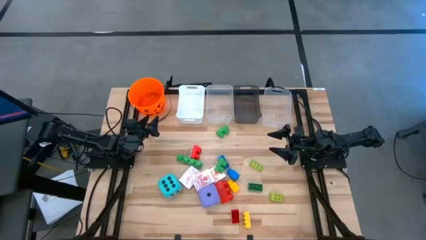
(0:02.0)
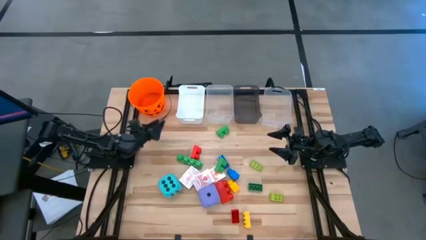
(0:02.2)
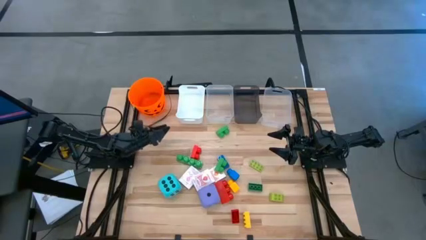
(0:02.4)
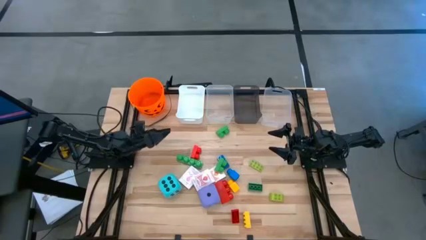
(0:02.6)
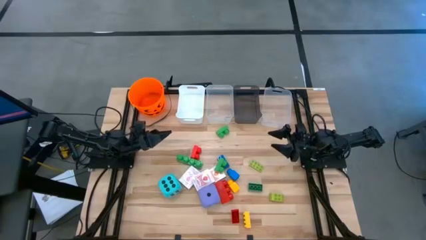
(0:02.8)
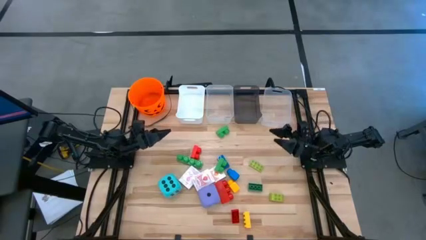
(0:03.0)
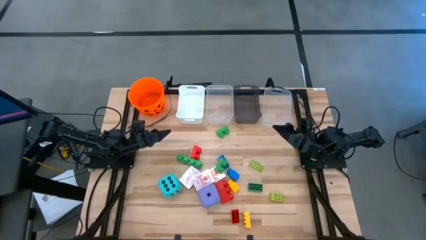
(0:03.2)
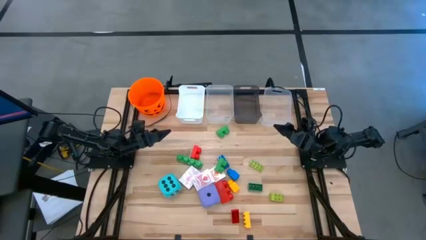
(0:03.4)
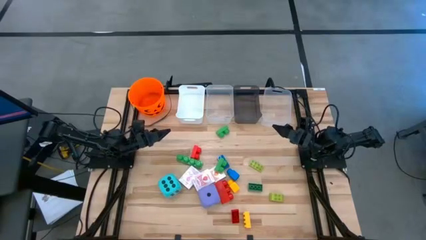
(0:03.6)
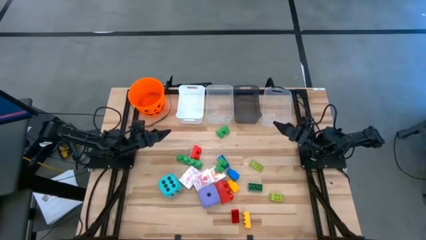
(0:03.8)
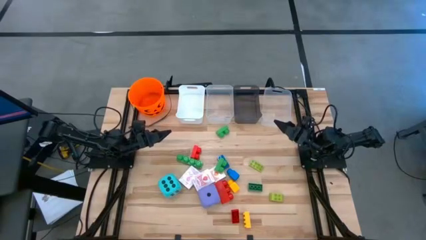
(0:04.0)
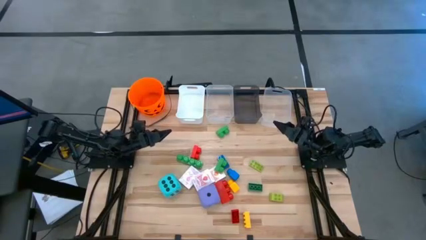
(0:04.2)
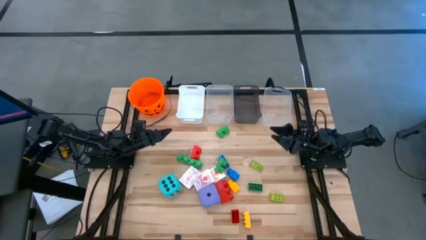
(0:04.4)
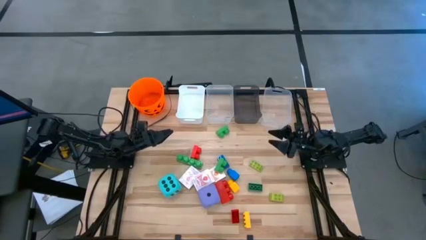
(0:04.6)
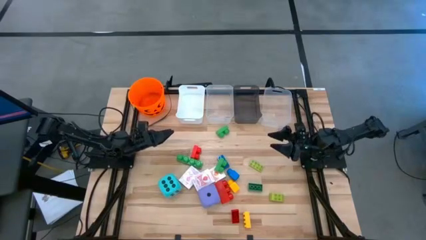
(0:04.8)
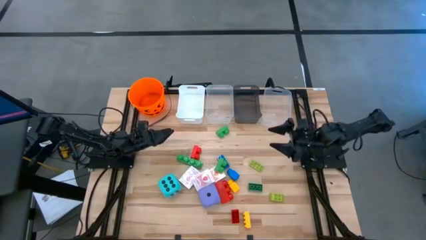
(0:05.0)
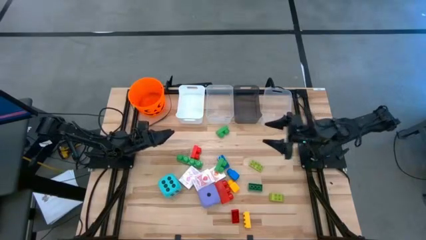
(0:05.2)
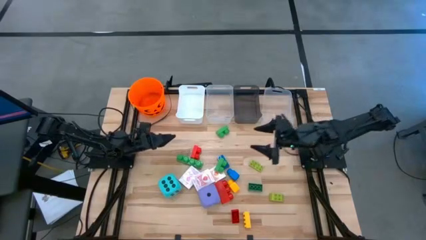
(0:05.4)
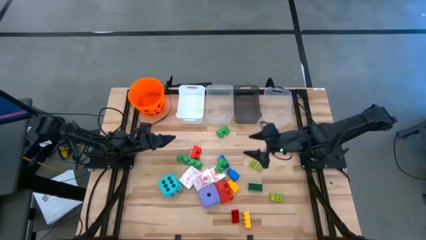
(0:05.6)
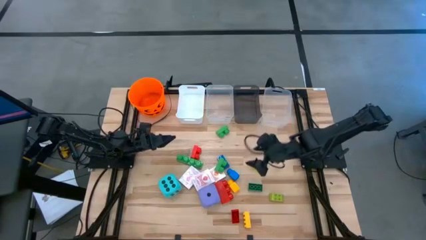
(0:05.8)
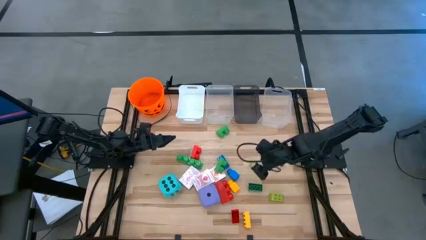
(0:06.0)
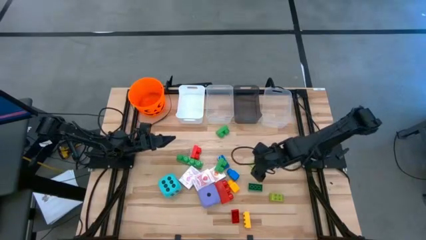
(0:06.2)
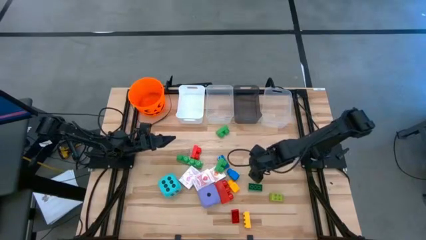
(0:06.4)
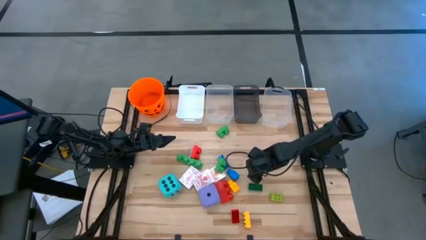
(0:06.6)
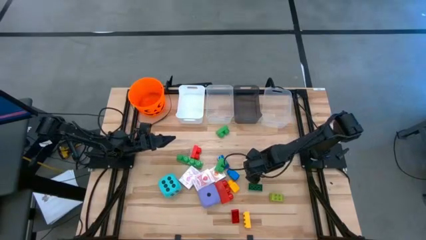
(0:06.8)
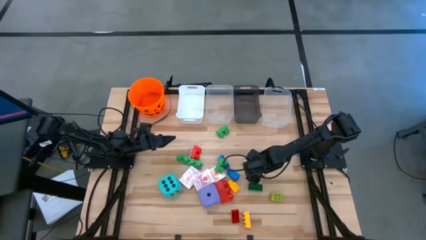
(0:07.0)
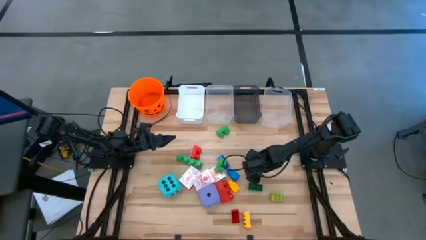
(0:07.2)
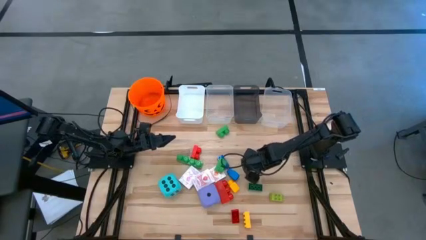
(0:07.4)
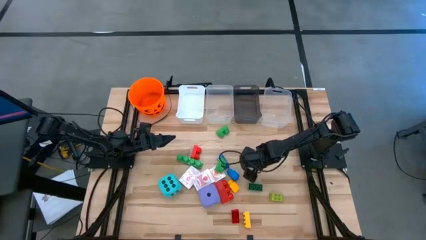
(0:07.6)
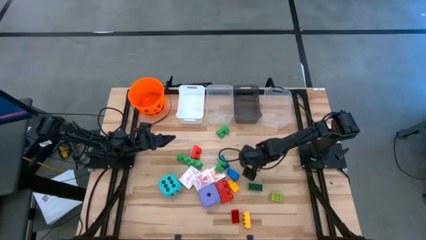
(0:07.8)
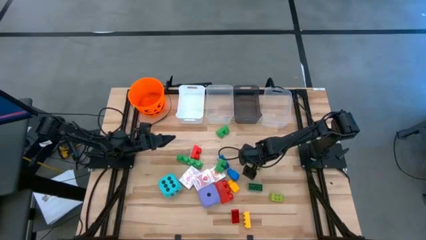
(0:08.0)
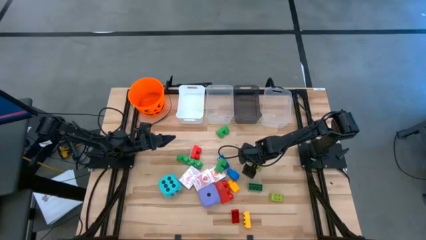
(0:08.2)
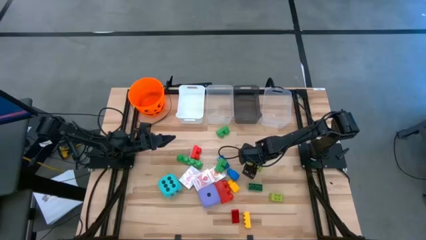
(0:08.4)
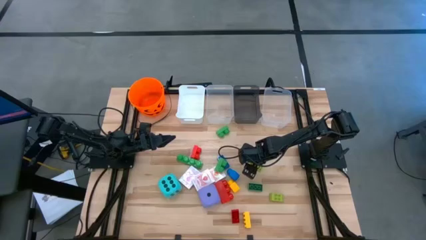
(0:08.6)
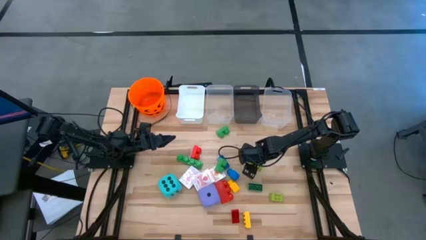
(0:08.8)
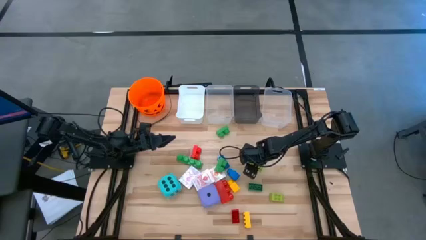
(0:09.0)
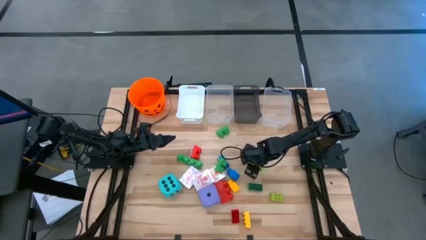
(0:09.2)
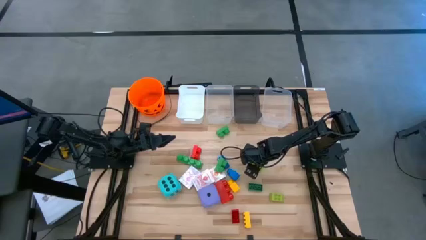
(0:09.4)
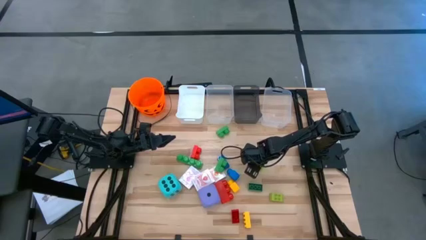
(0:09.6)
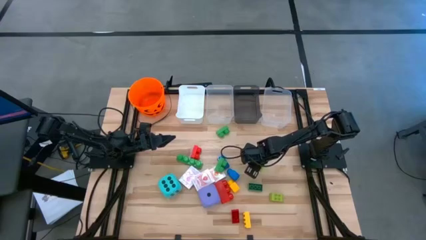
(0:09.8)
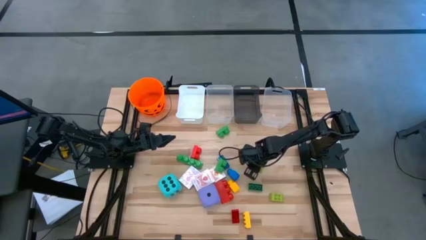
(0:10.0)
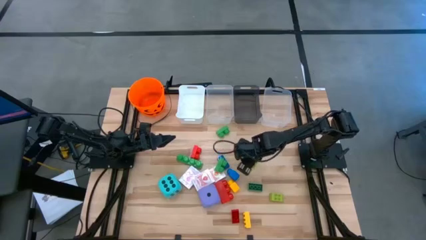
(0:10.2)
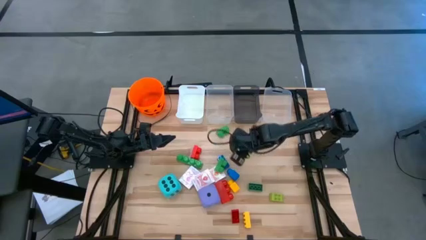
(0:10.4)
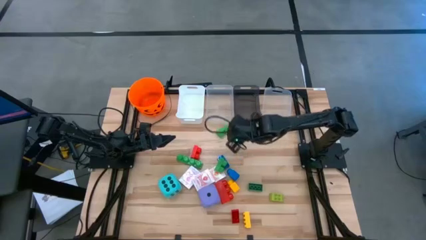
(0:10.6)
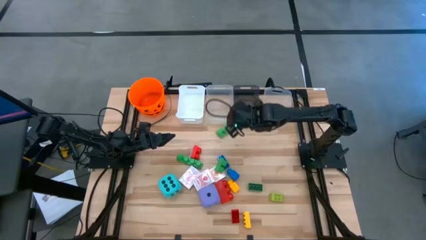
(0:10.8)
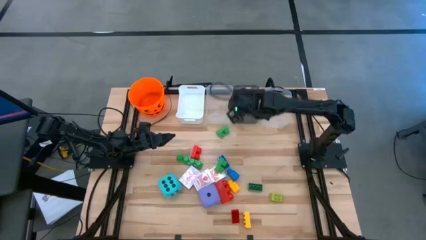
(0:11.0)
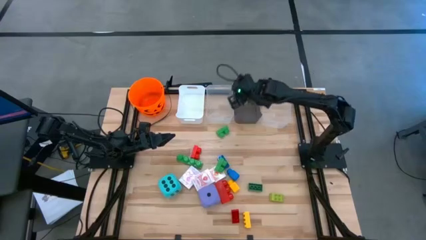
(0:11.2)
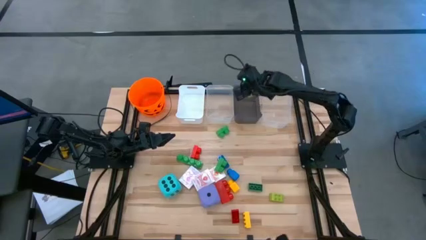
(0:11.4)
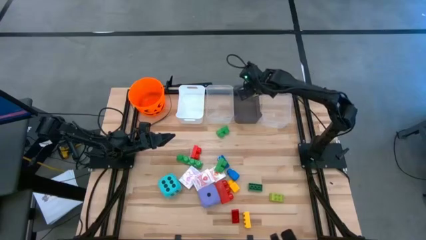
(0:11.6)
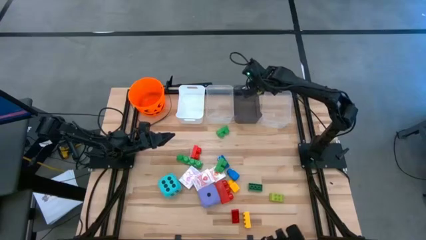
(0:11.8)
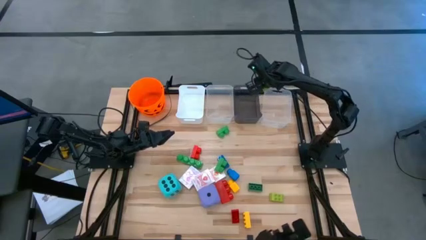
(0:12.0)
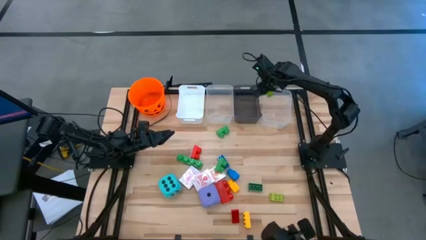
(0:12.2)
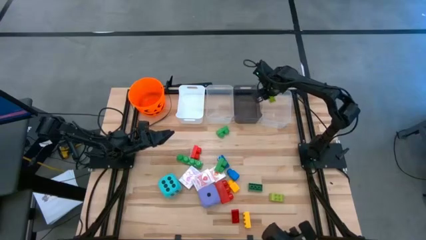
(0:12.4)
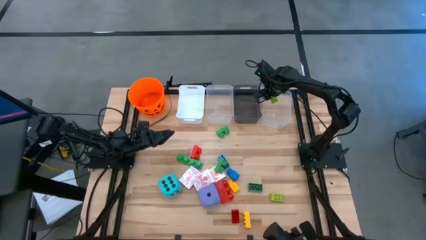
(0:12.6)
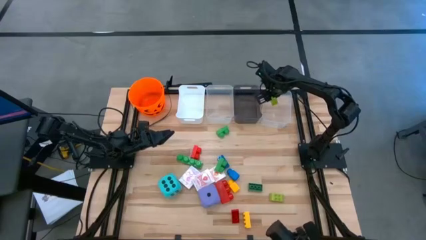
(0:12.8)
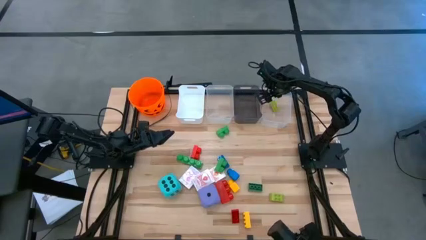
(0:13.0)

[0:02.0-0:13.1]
Task: Pick & Place Toys
Put the top light green game piece into the right transparent bin

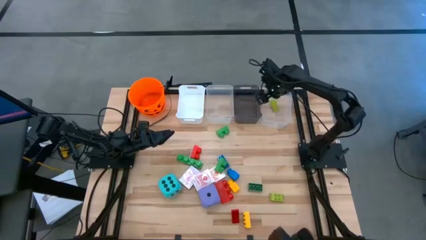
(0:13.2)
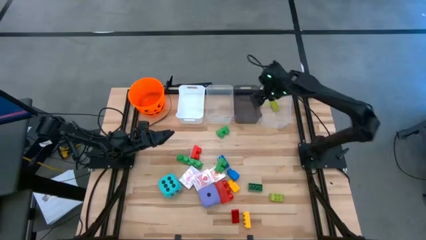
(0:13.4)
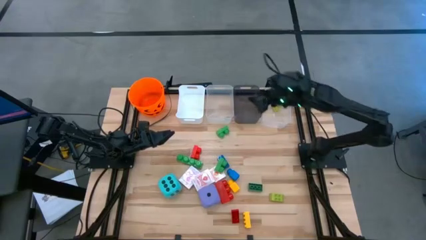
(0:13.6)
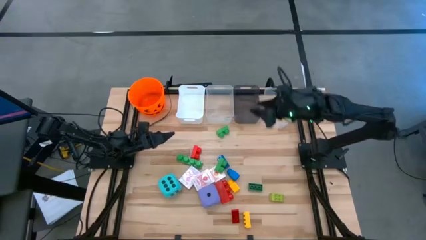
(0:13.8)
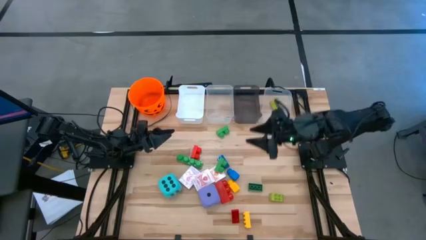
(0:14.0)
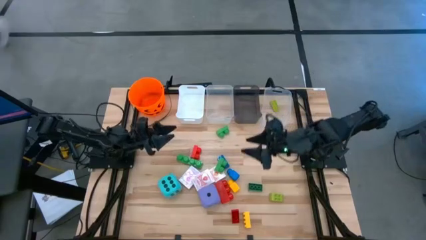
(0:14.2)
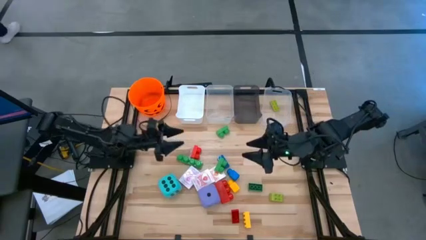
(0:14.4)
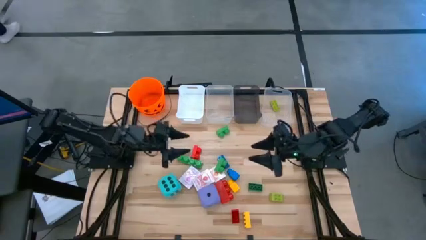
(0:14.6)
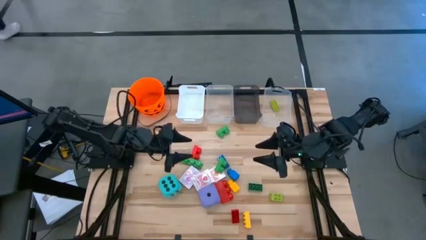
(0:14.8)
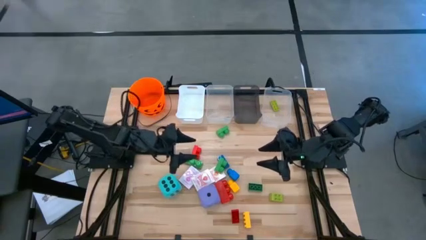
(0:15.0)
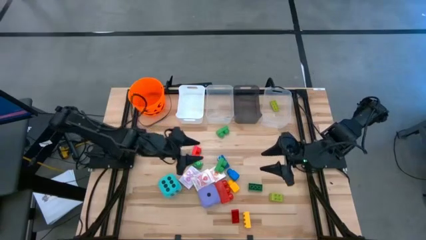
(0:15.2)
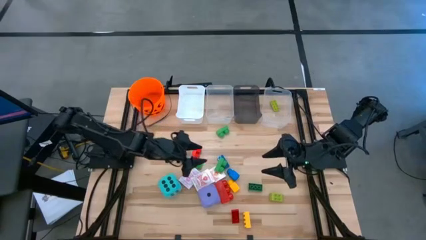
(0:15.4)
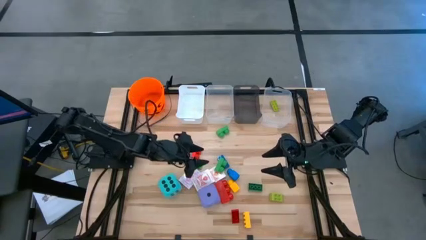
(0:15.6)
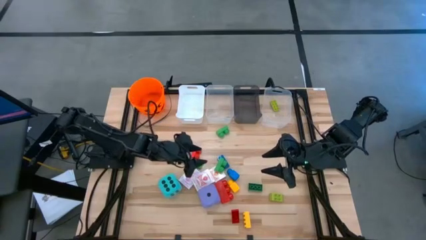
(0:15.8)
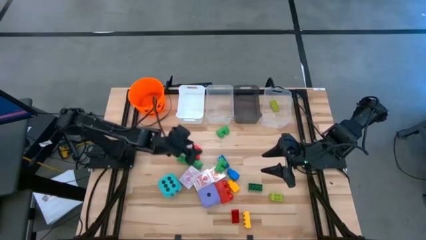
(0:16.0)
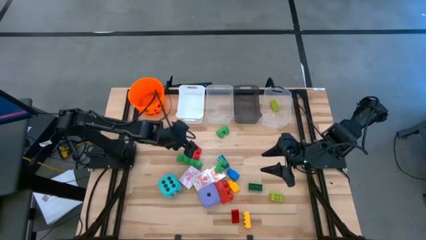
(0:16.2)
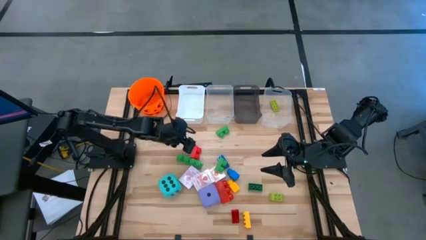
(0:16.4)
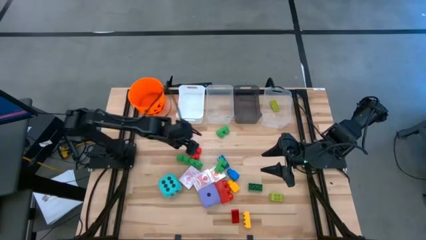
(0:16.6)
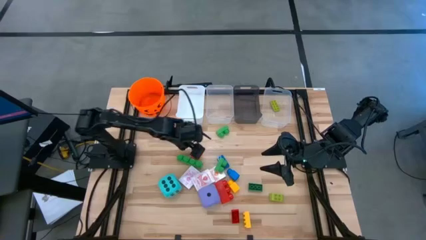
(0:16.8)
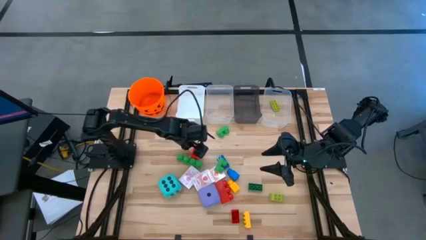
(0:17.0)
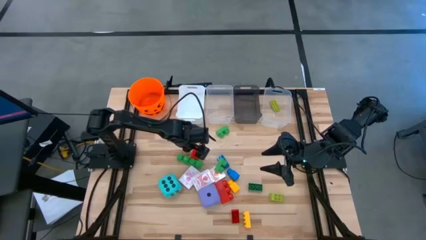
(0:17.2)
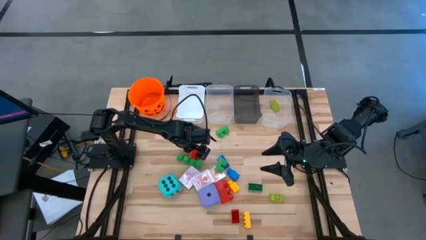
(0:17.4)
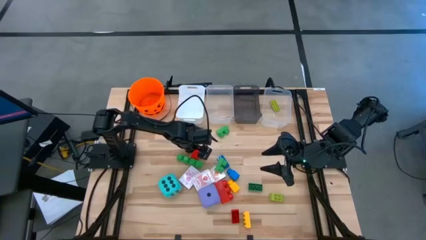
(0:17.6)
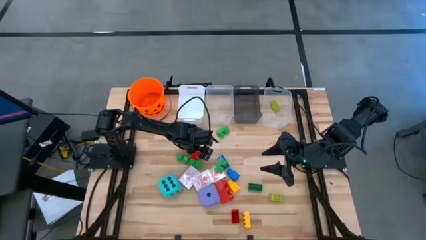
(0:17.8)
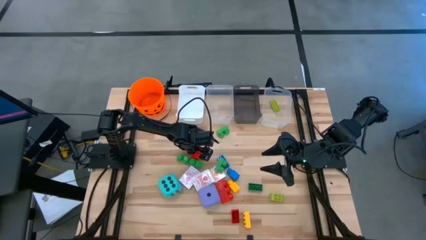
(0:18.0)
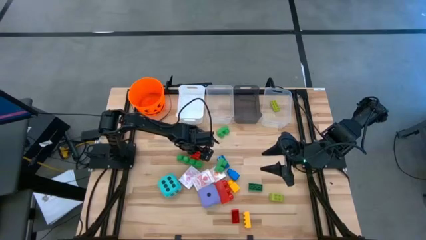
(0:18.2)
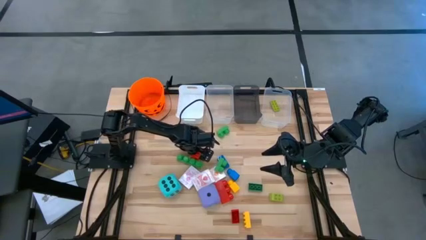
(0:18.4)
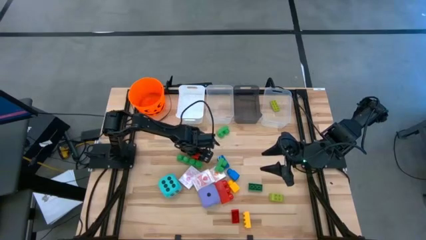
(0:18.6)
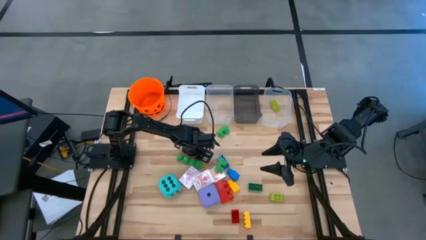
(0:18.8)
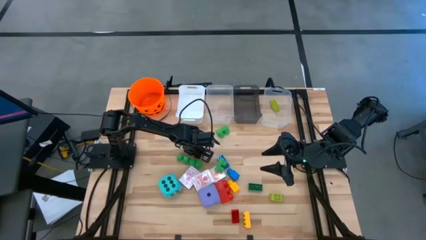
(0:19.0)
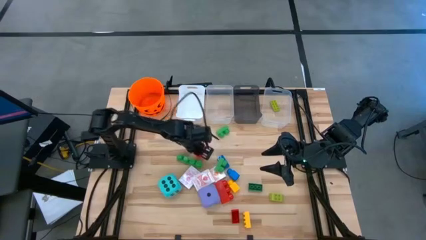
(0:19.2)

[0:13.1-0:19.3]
Put the 2 stud red game piece into the white bin
